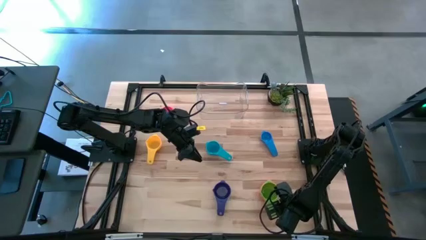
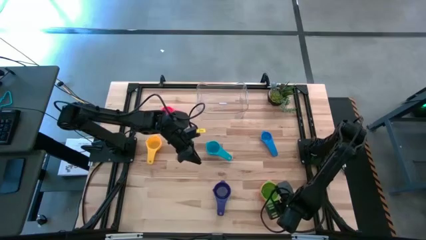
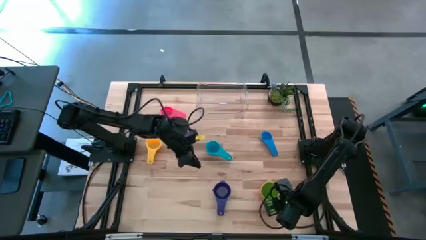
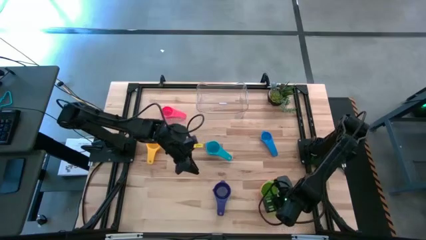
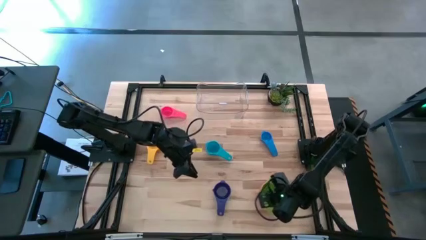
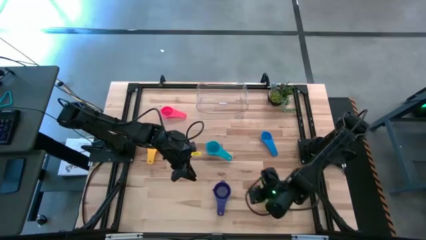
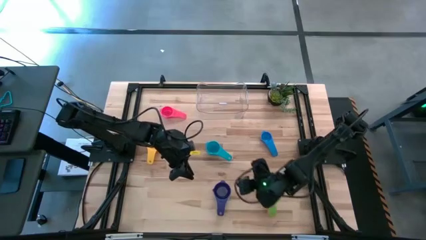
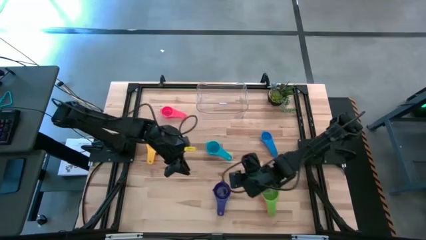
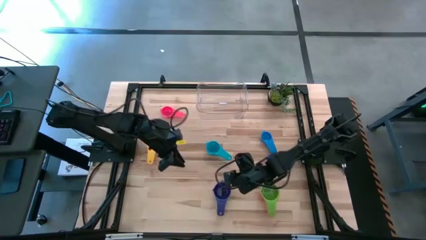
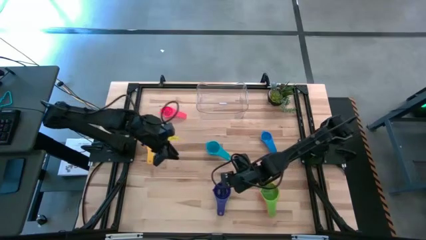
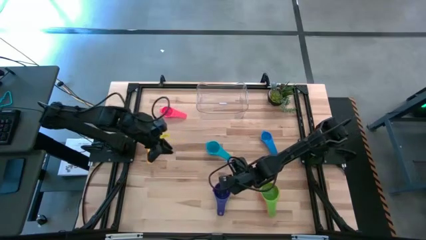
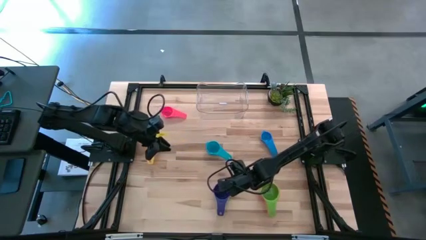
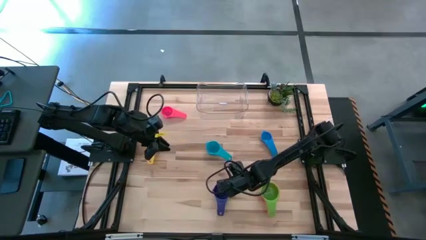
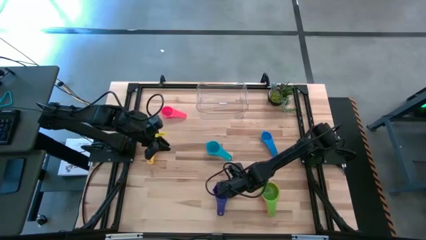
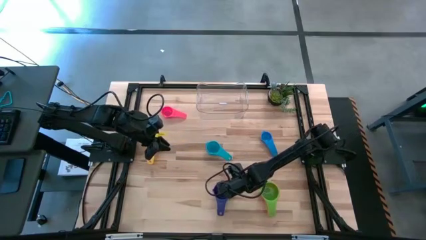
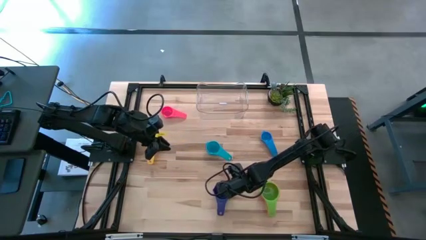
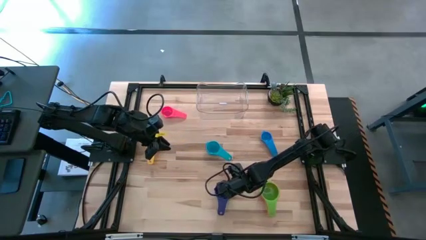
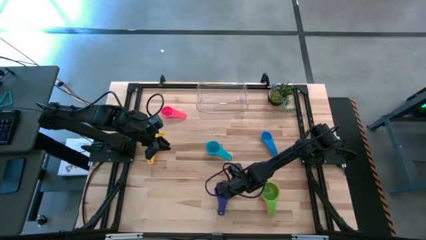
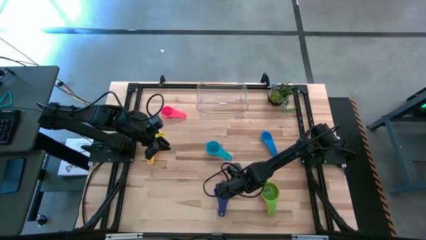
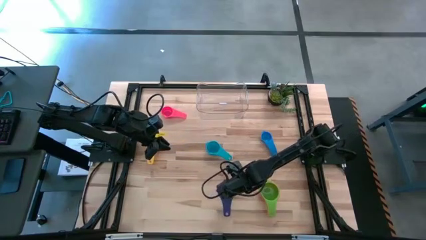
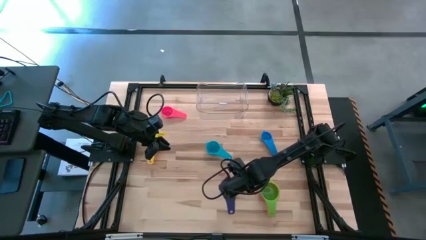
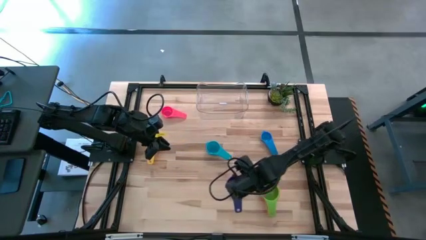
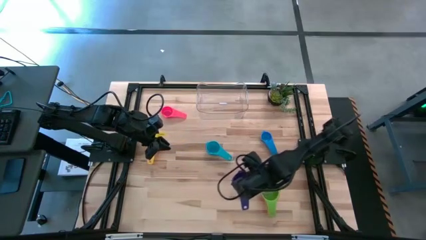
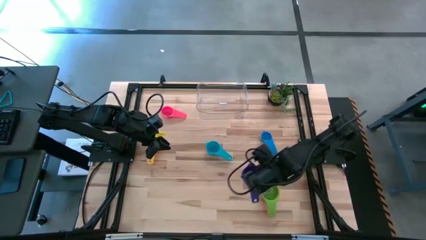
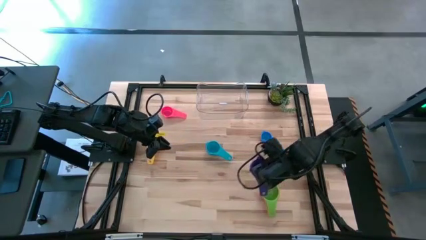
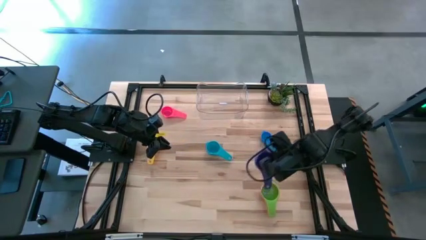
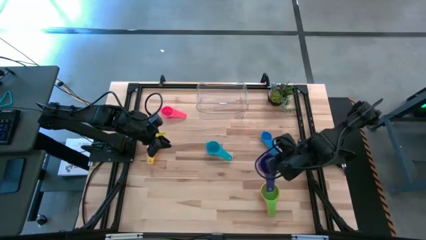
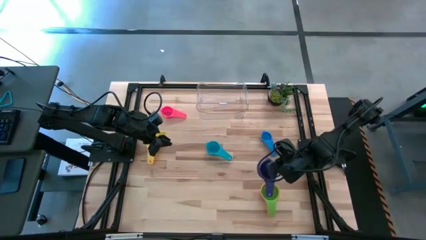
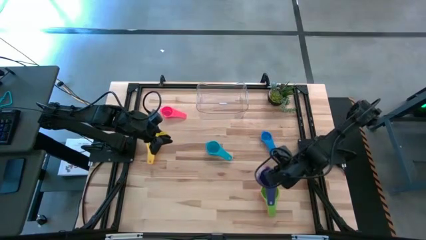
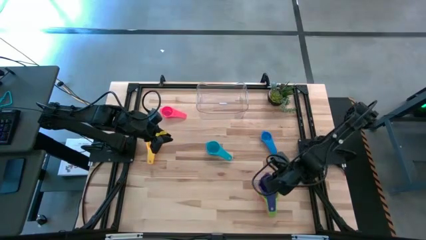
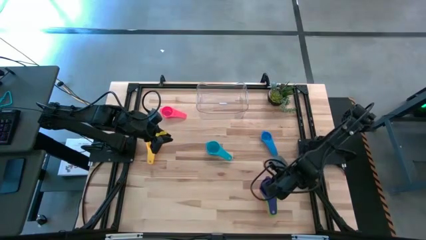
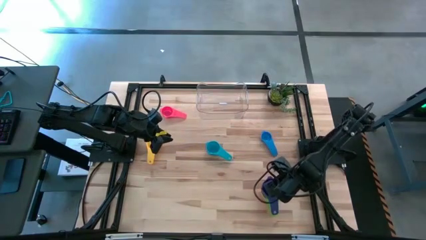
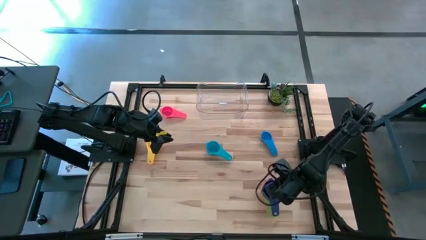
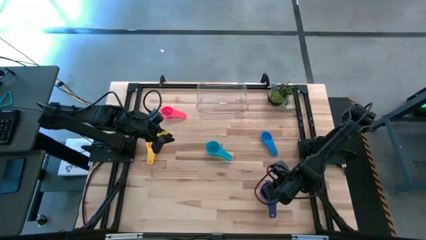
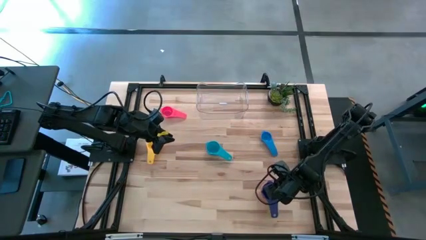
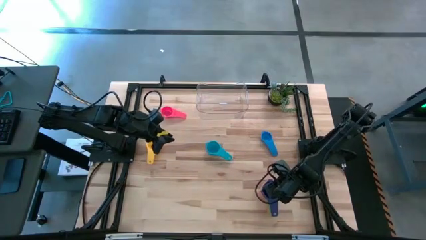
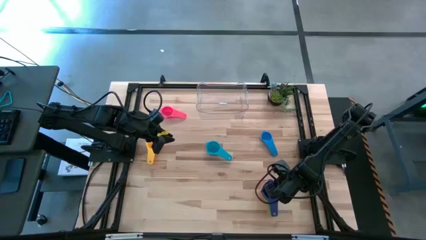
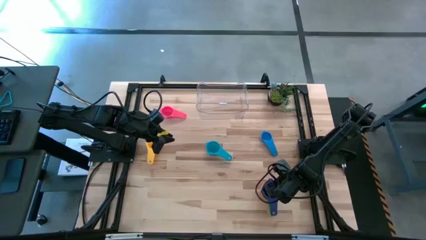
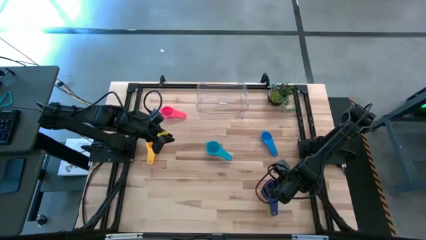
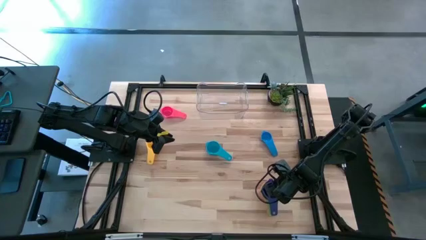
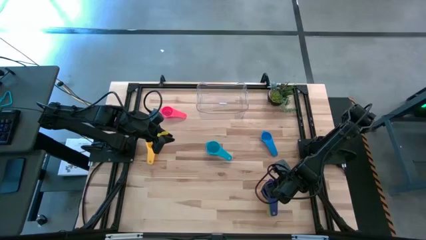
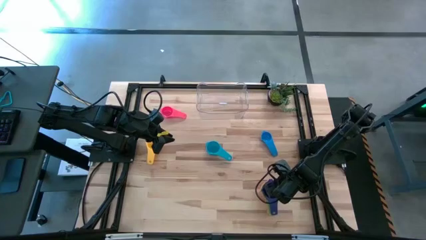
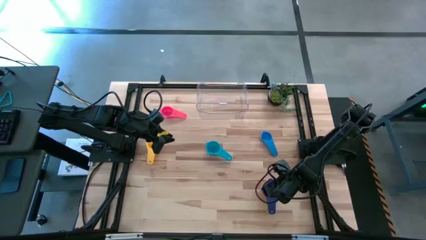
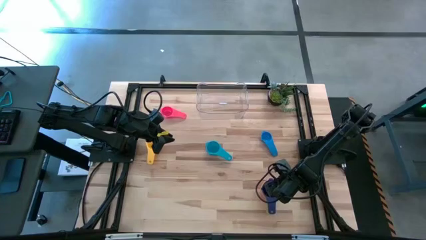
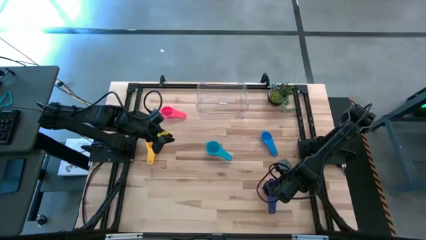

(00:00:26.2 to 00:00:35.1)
Task: Nest measuring cups in basket
Stack the dark blue measuring cup on top of the green measuring cup

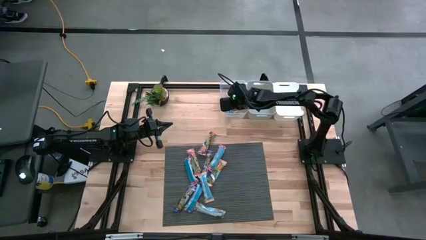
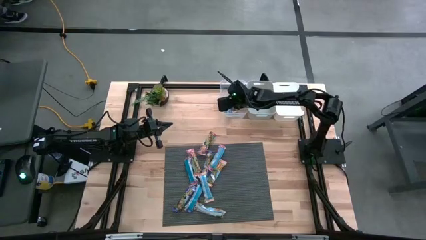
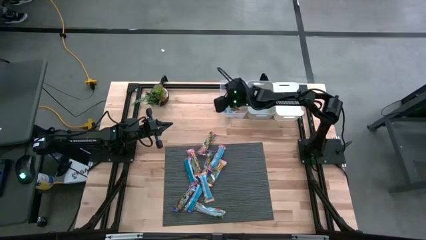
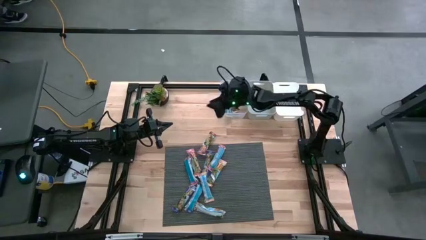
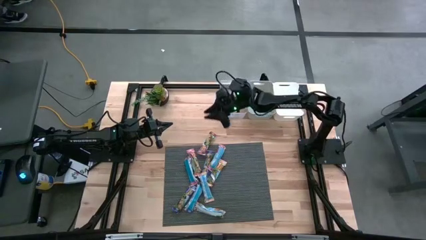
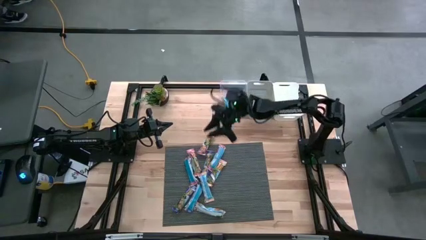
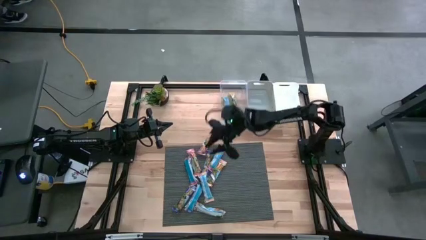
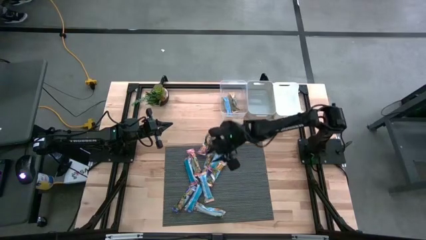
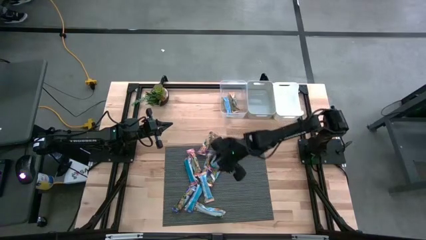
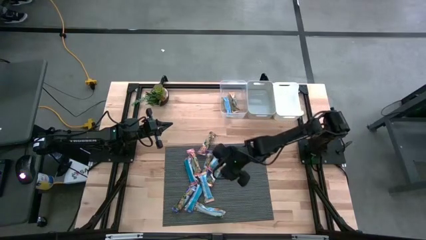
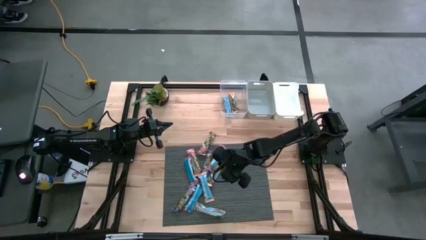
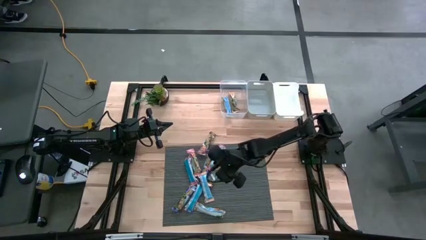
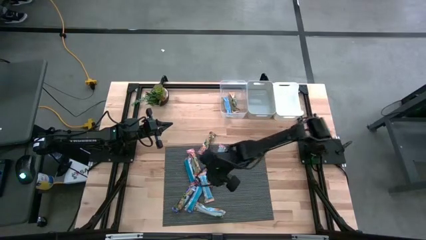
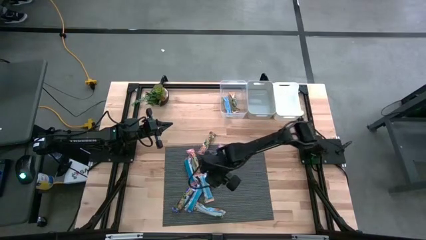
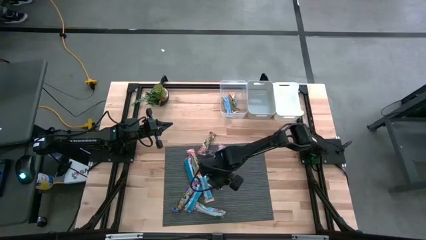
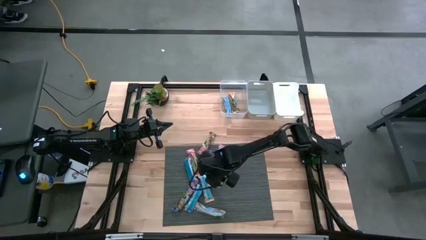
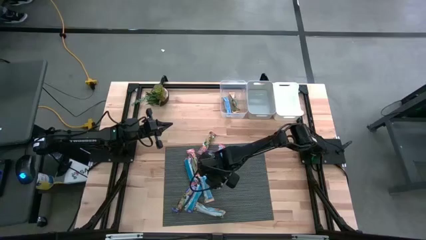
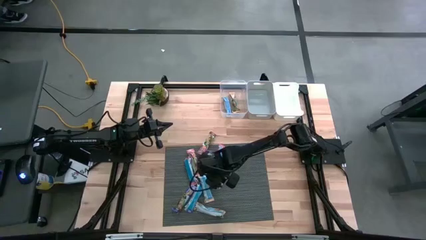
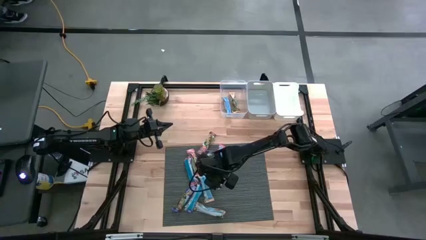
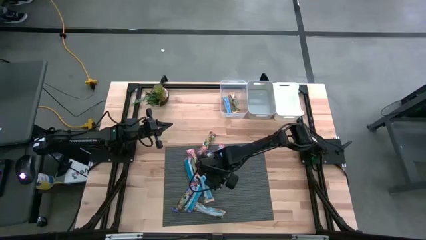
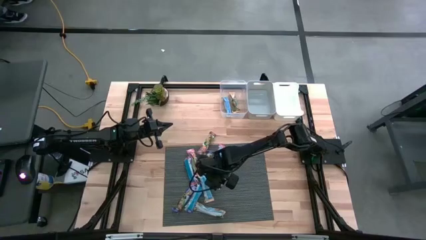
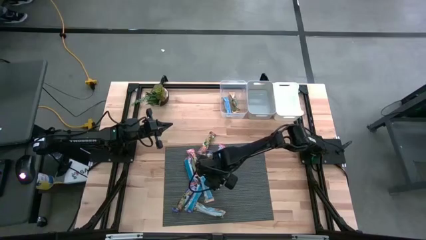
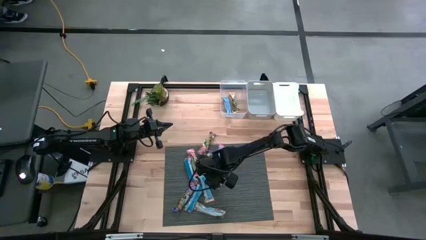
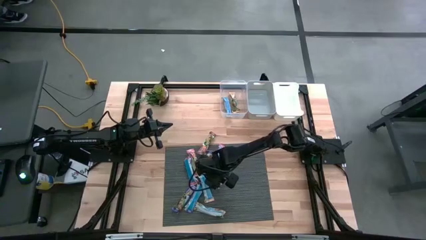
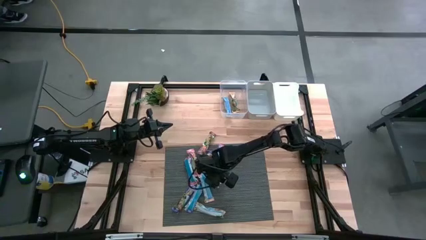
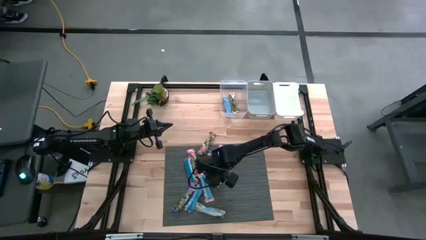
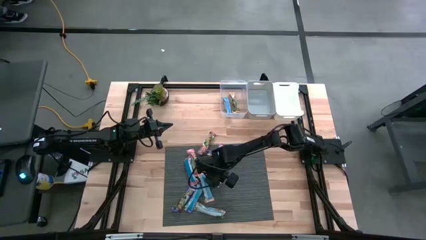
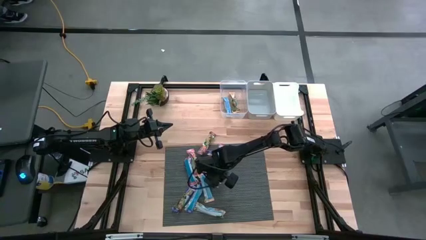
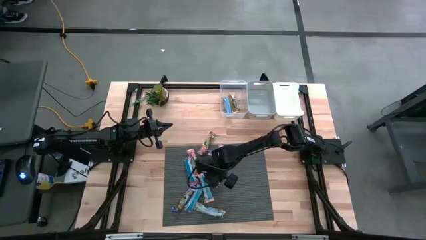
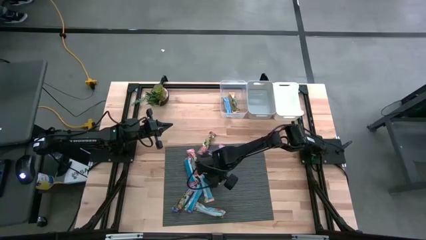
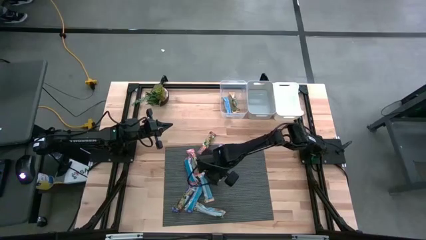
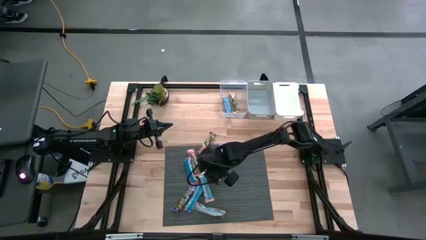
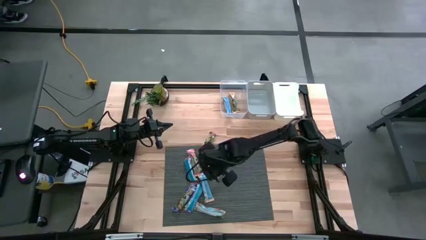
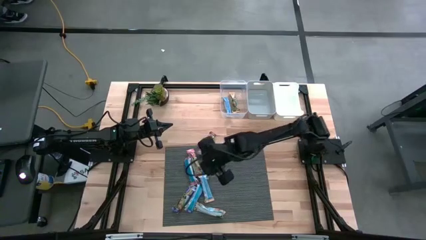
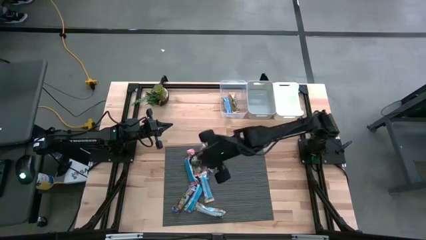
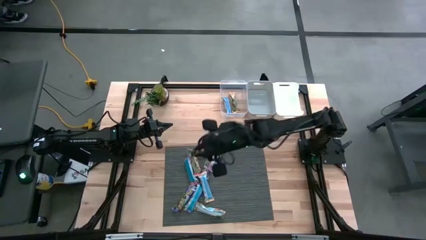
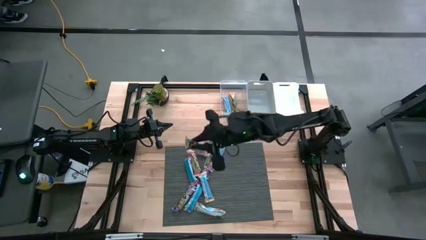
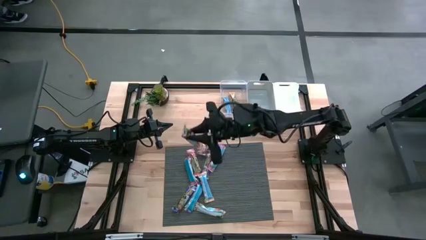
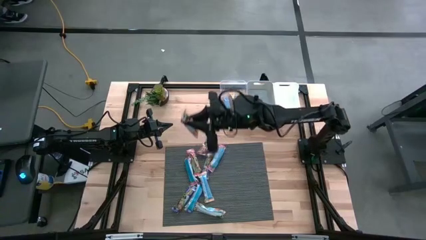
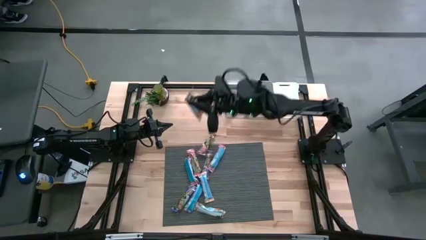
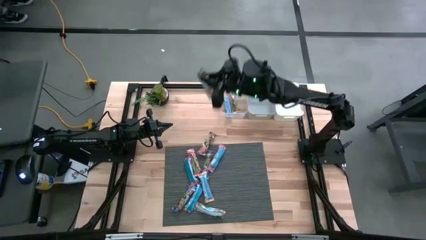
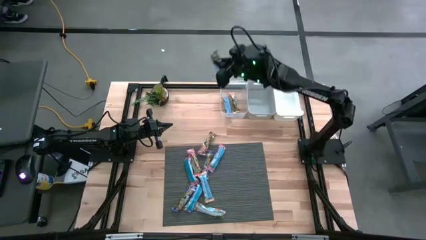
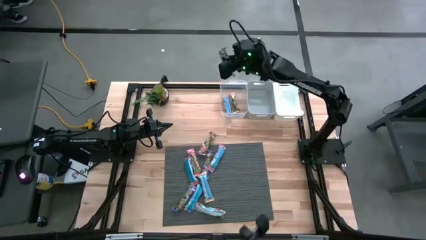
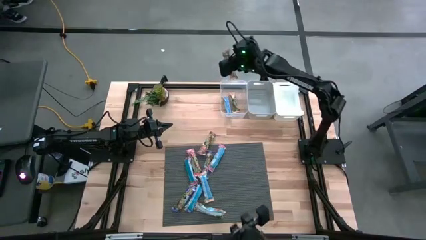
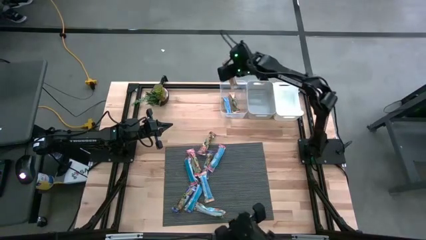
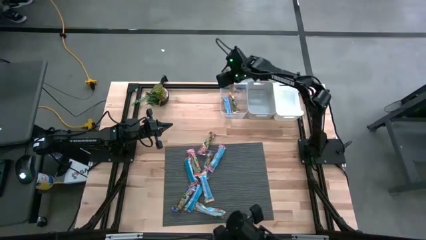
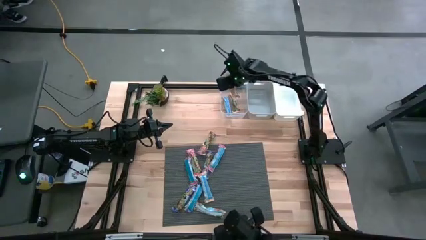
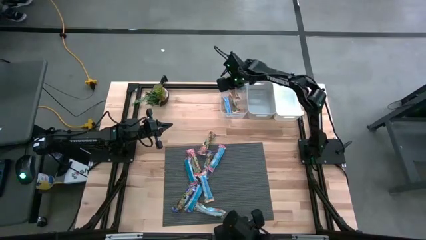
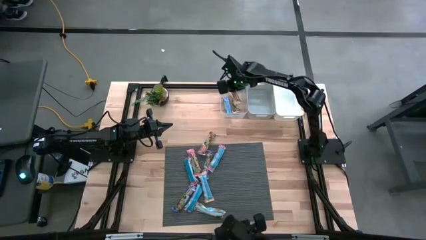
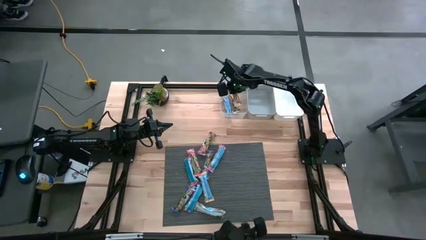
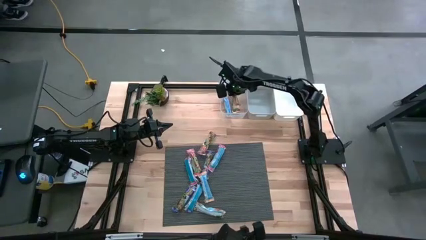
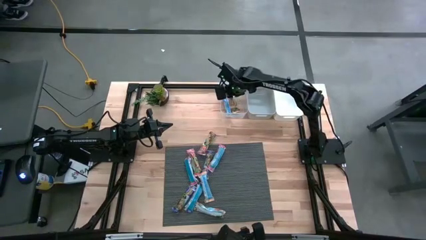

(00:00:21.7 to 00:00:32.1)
Task: Pick and place Granola Bars by type
Put the yellow granola bar into the transparent bin
